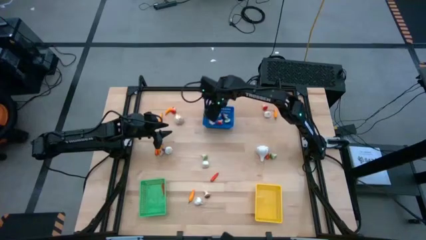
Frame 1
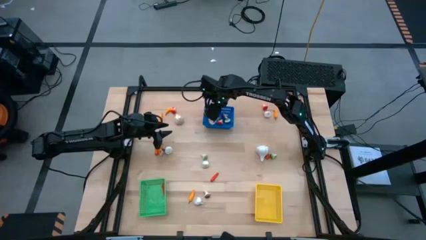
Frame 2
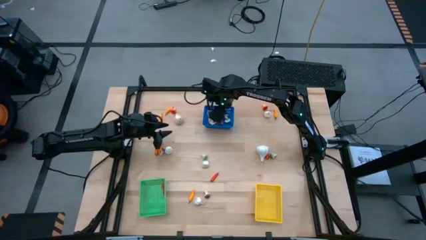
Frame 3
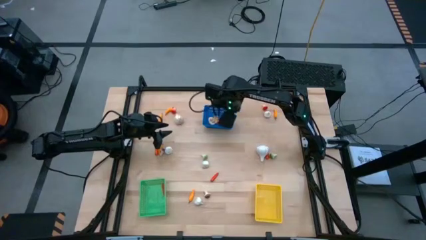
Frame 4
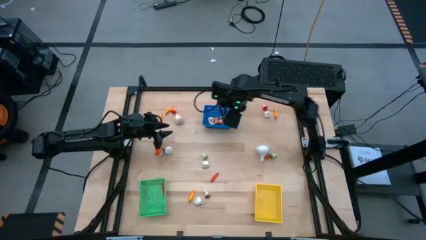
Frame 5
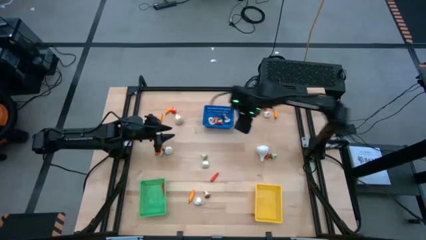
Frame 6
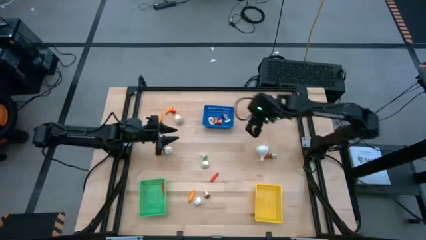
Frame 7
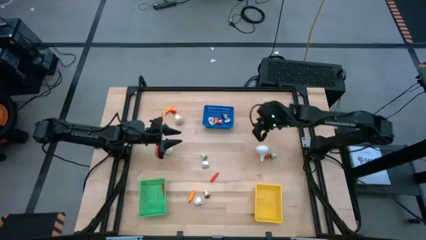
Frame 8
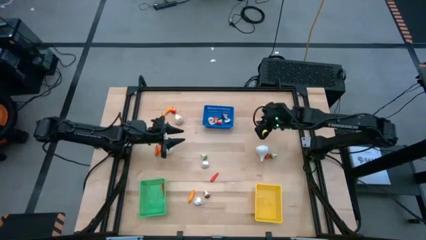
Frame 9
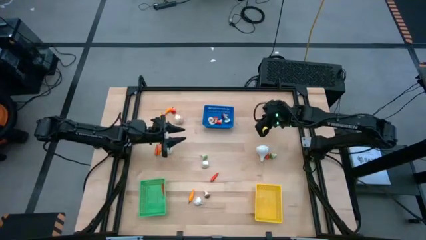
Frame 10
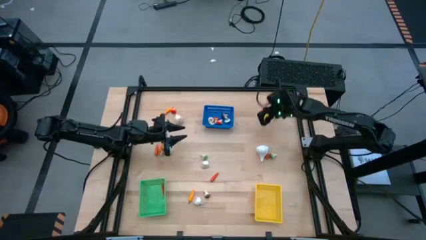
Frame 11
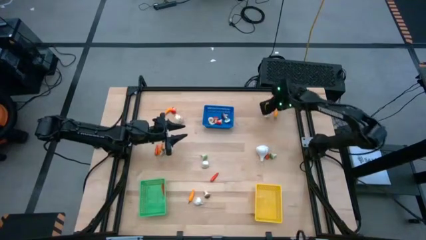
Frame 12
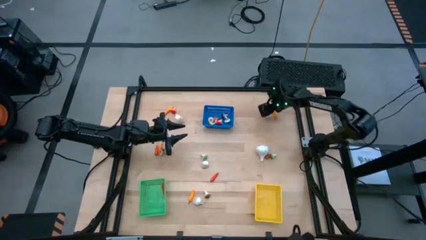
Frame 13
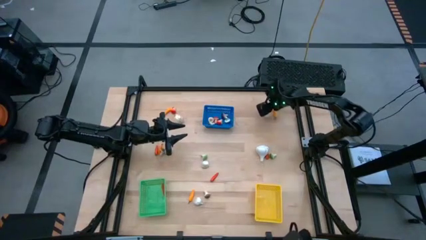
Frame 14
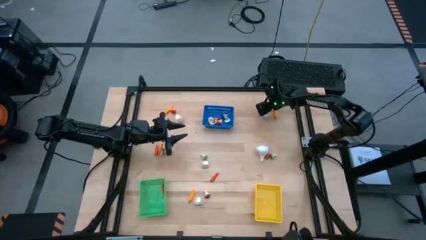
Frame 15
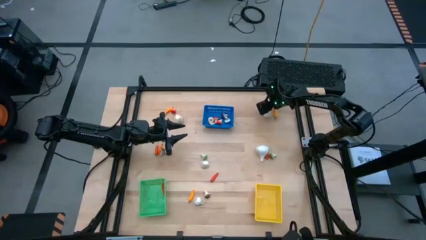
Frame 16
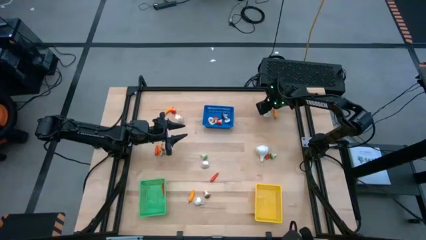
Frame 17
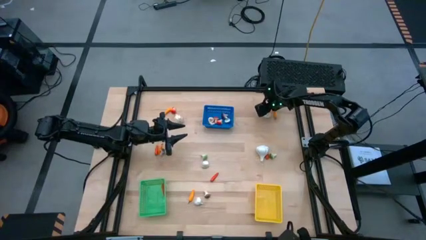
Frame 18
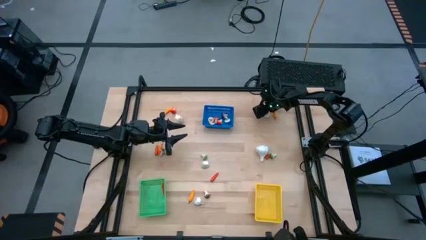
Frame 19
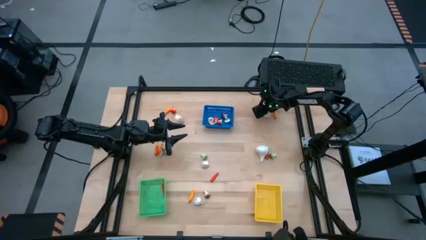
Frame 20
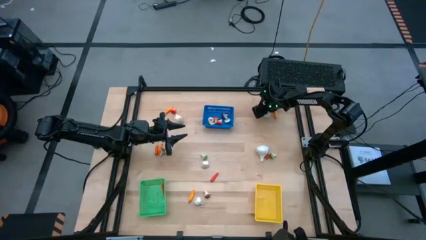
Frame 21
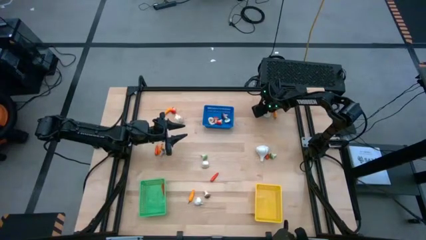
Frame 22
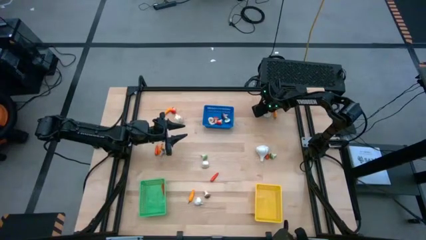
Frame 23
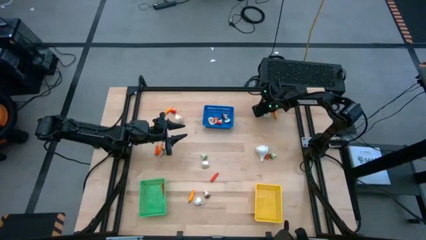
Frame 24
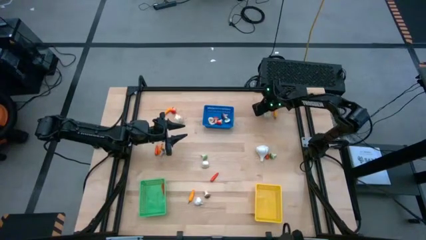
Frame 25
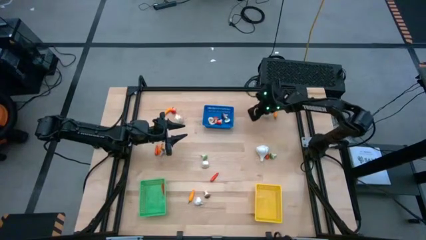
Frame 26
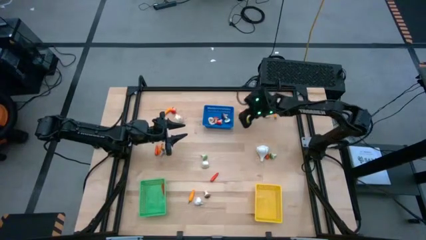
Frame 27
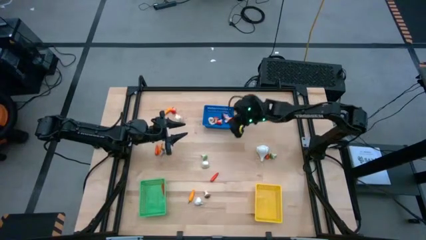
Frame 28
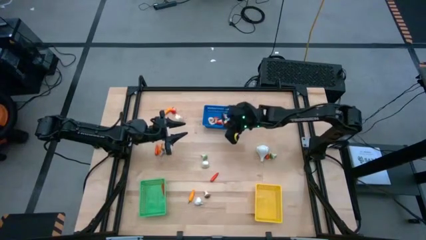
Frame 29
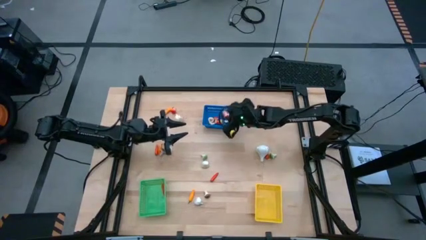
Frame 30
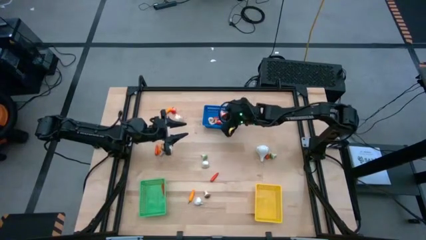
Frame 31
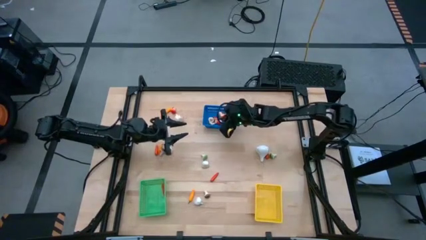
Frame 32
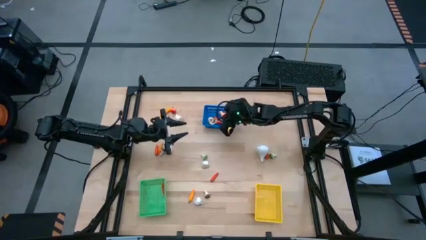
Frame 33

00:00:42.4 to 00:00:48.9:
Task: Sort produce into baskets
Put the red mushroom into the blue bin

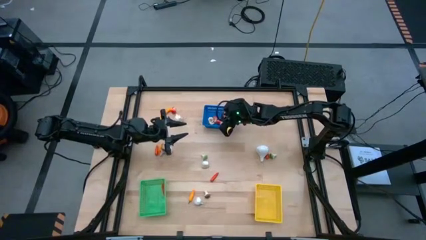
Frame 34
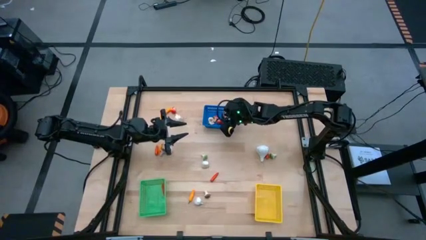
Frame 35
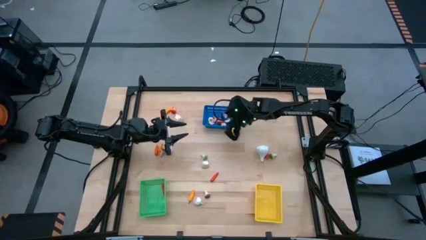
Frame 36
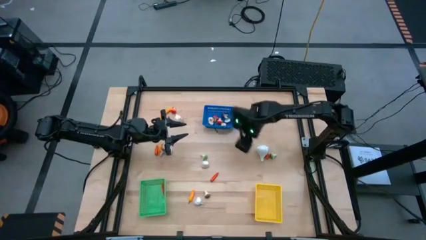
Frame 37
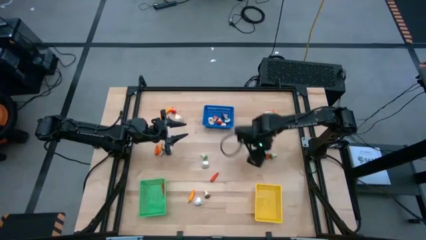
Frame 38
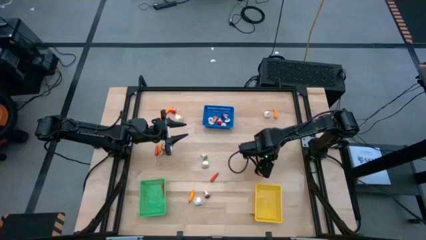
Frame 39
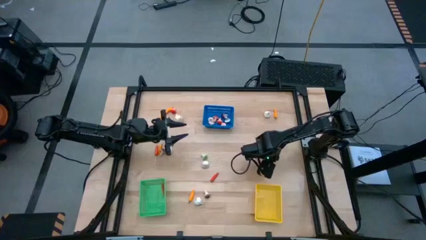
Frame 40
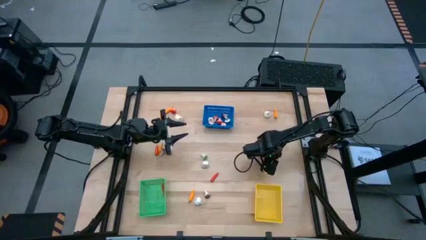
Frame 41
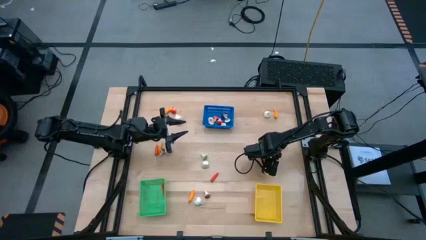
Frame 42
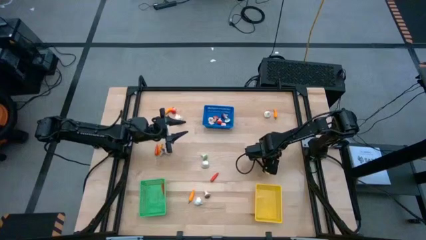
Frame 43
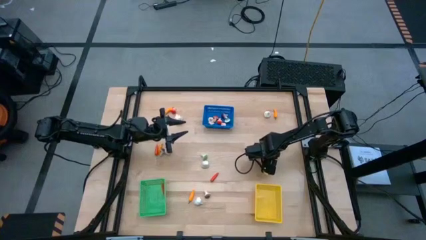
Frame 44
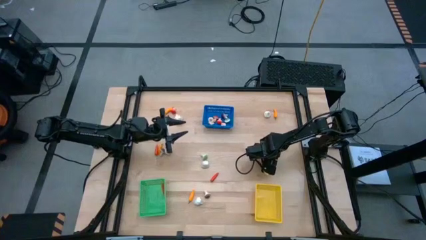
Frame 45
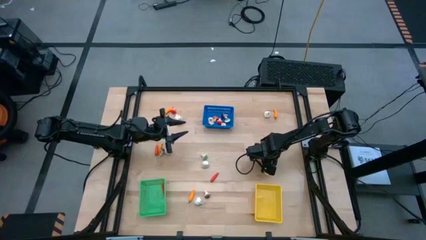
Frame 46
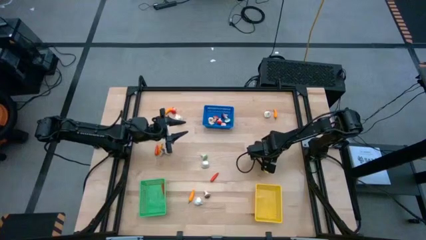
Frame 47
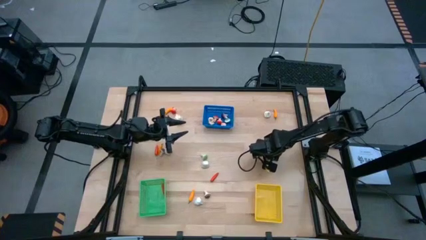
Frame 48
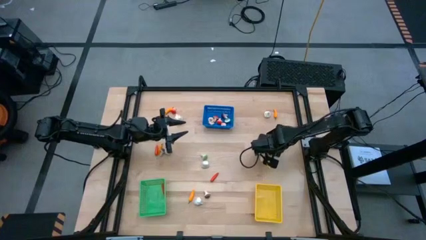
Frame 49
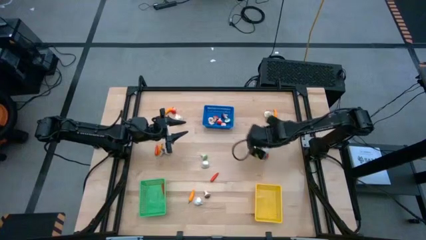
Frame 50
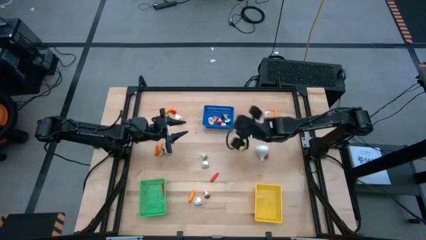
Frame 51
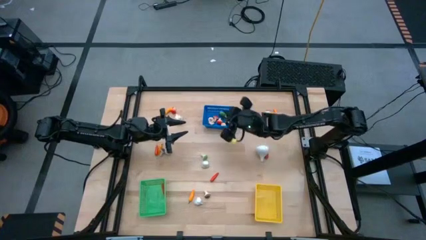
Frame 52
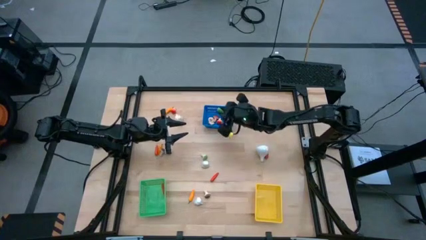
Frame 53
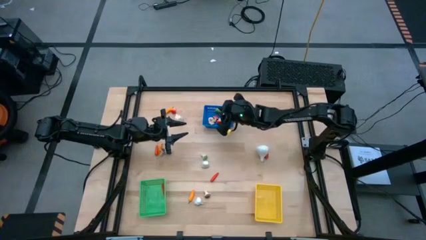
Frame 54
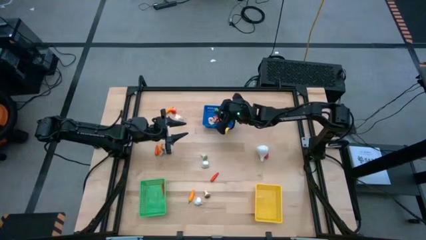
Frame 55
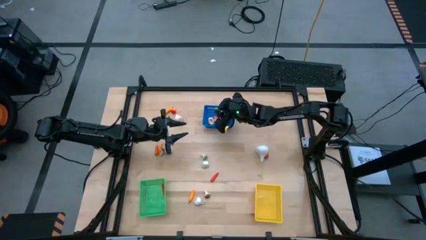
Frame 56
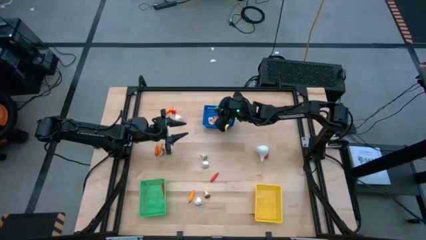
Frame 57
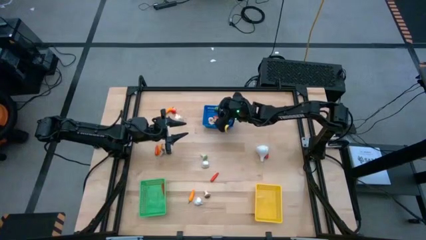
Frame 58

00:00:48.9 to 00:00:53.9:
Put the green mushroom into the blue bin

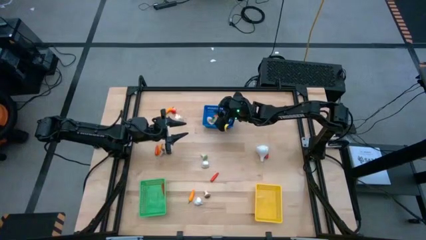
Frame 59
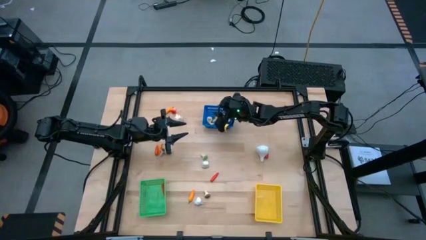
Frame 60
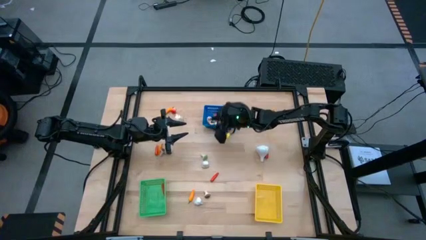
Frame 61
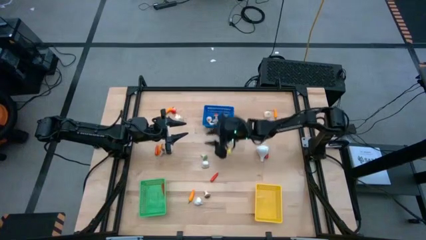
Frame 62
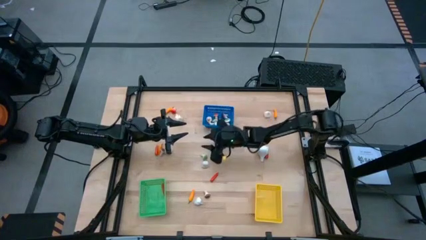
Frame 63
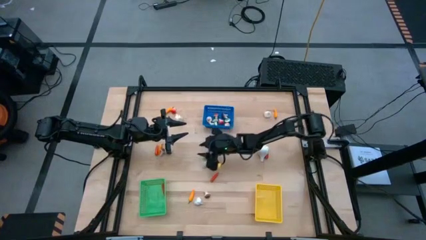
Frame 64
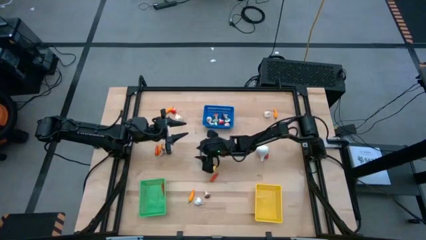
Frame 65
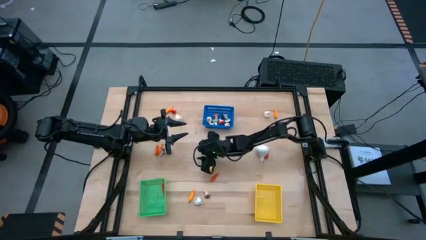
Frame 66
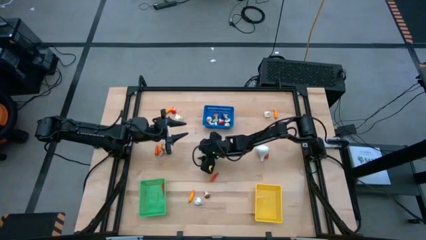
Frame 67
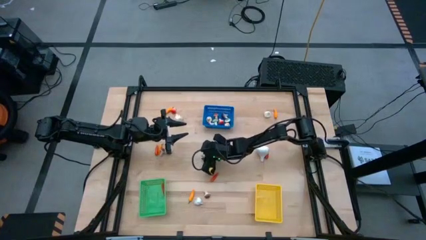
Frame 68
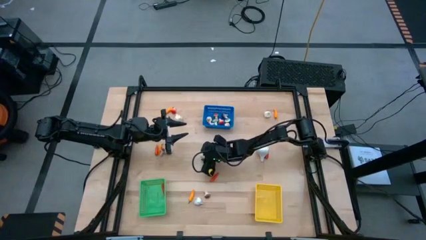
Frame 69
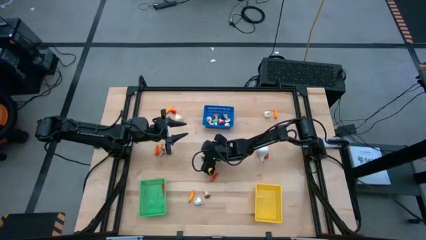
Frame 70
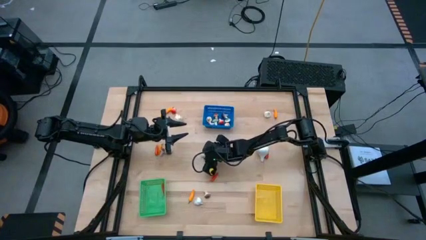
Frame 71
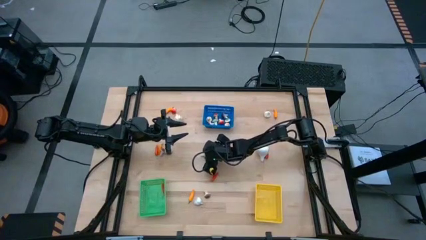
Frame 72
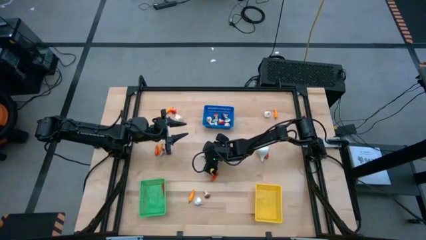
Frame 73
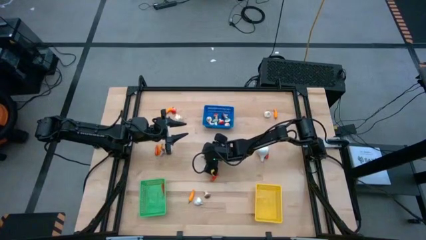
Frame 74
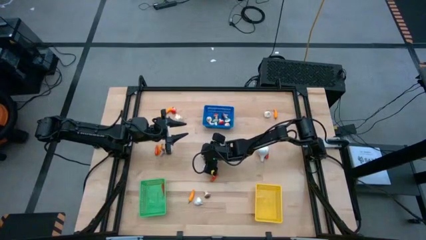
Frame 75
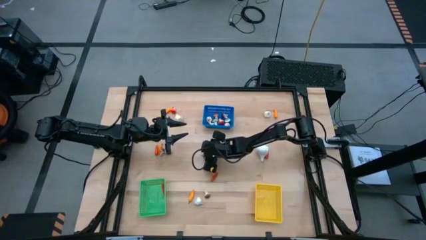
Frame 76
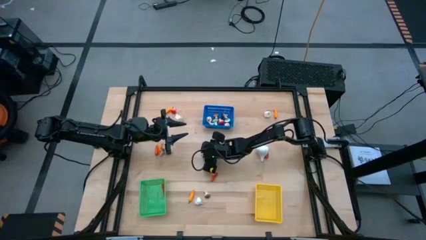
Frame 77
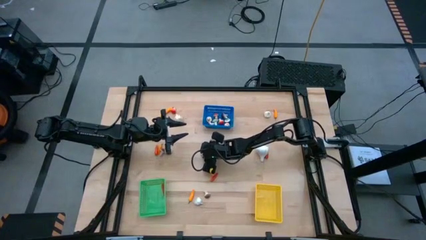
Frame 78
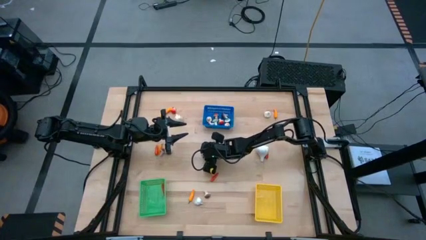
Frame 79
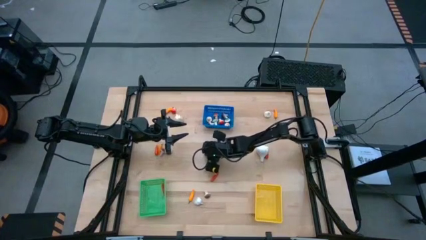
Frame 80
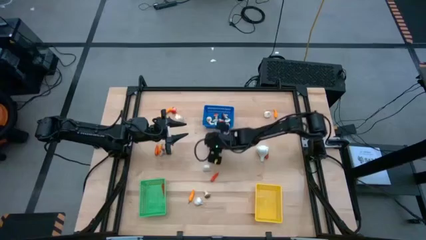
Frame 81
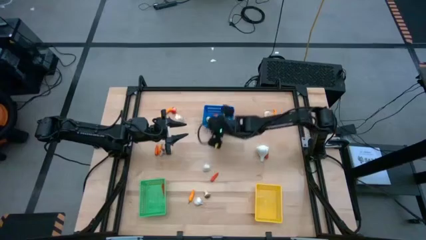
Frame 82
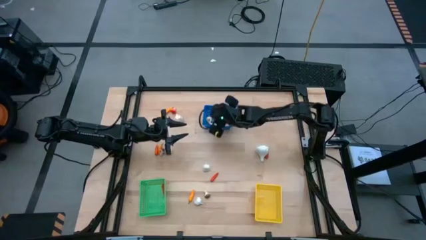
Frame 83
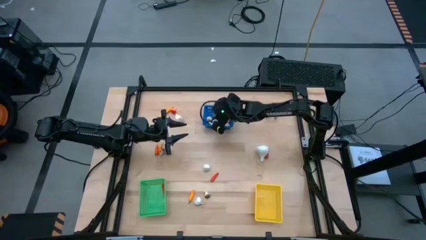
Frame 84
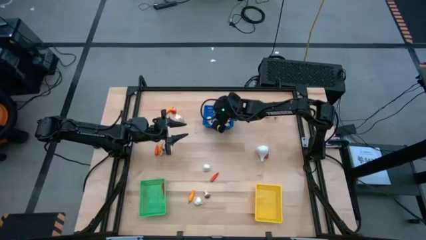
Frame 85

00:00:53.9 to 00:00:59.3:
Put the green mushroom into the blue bin
